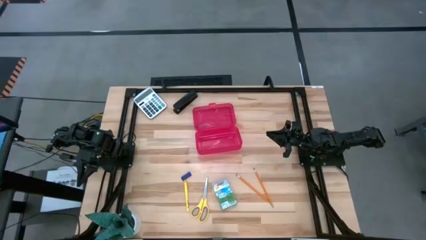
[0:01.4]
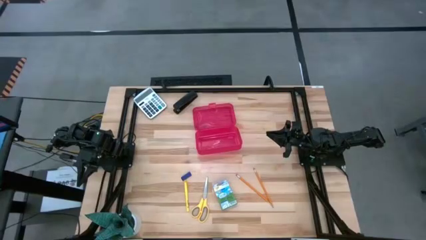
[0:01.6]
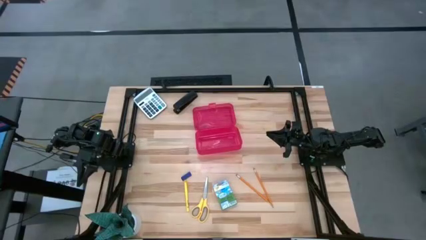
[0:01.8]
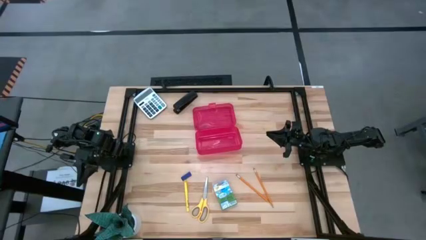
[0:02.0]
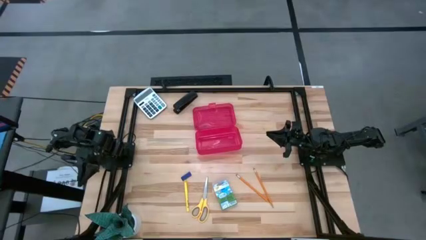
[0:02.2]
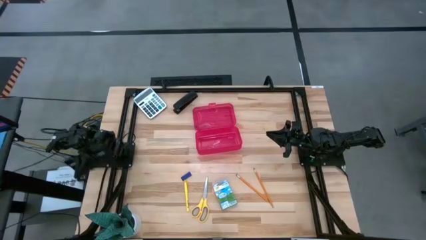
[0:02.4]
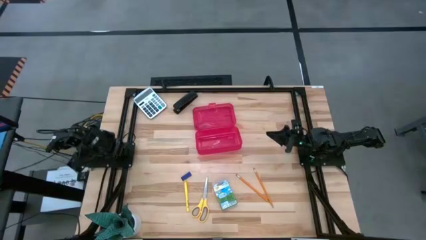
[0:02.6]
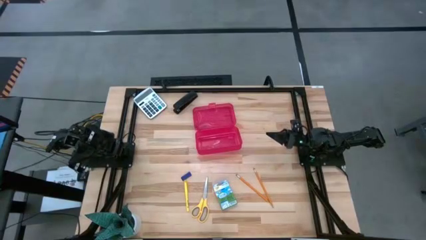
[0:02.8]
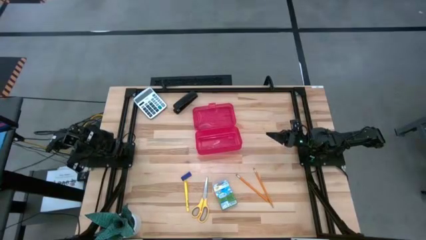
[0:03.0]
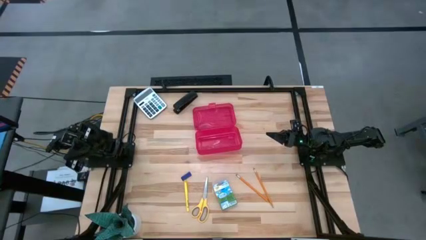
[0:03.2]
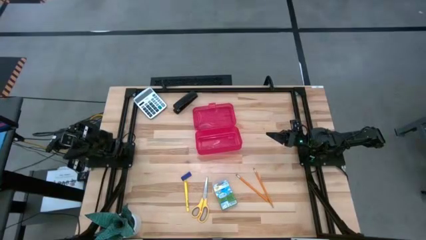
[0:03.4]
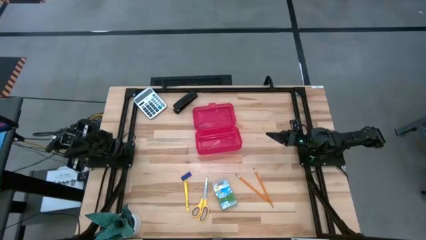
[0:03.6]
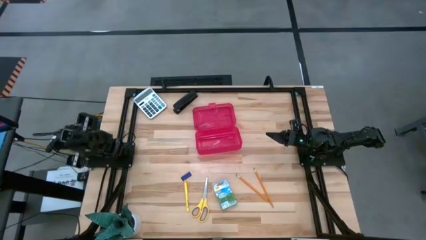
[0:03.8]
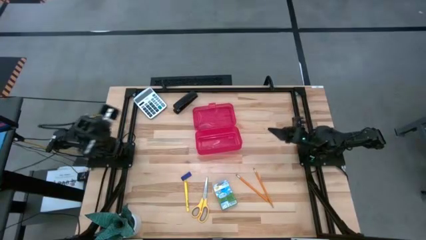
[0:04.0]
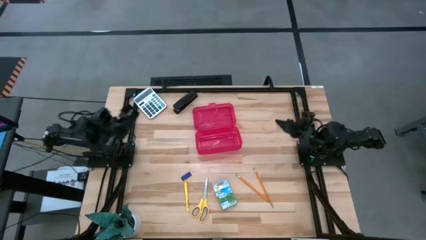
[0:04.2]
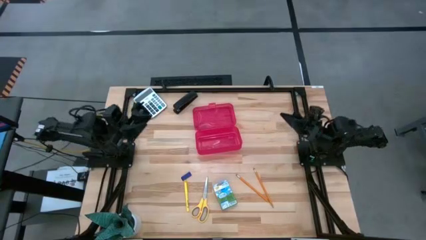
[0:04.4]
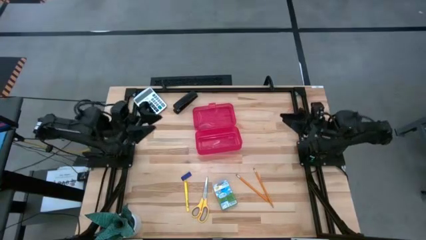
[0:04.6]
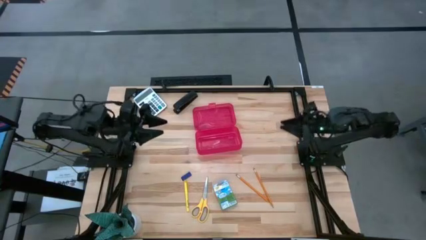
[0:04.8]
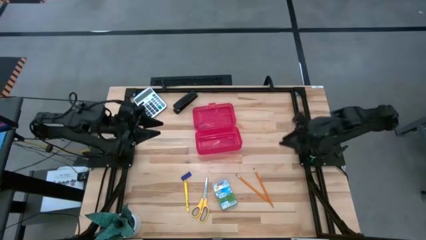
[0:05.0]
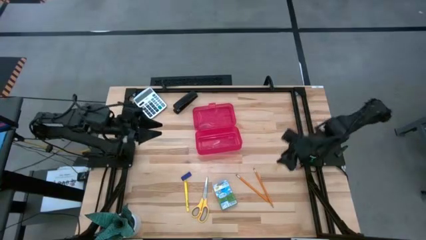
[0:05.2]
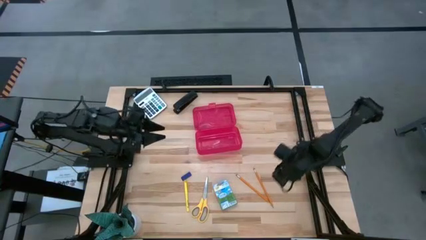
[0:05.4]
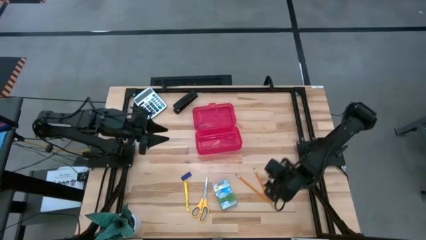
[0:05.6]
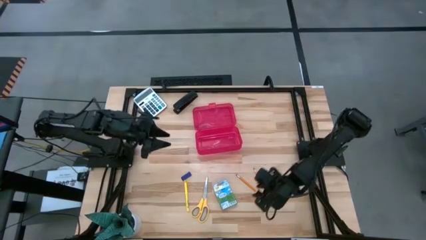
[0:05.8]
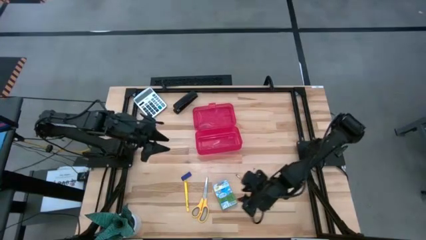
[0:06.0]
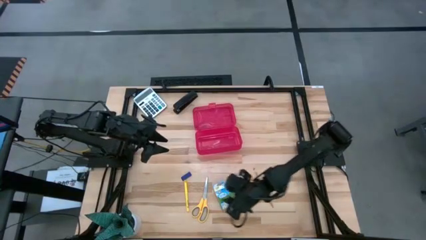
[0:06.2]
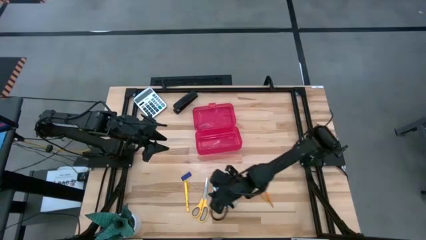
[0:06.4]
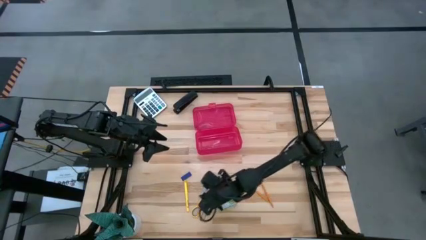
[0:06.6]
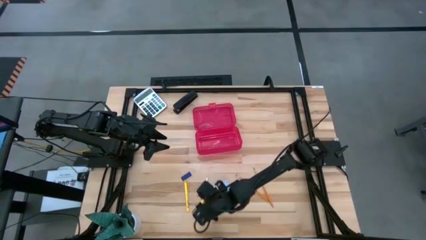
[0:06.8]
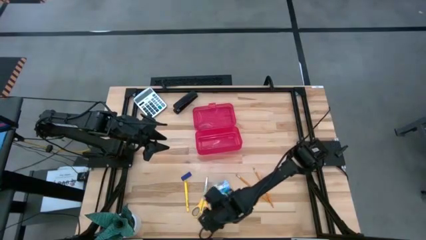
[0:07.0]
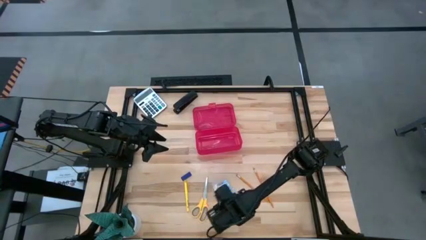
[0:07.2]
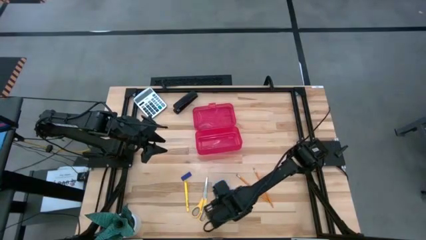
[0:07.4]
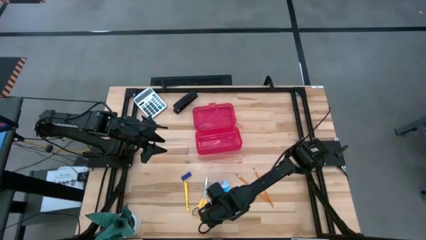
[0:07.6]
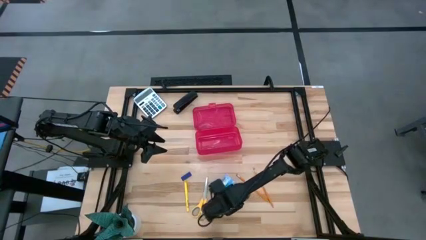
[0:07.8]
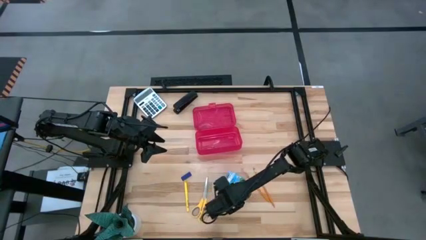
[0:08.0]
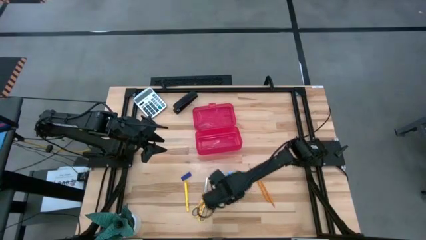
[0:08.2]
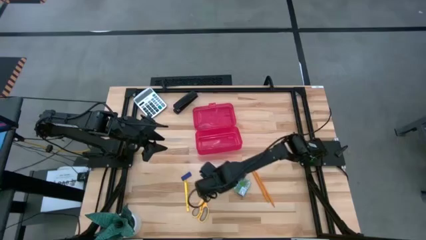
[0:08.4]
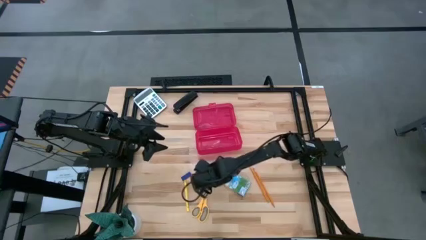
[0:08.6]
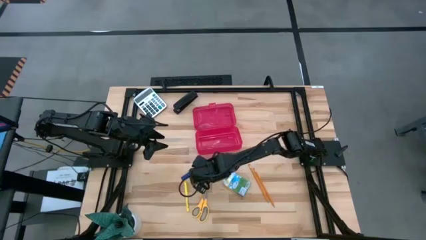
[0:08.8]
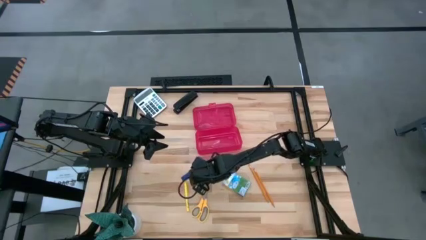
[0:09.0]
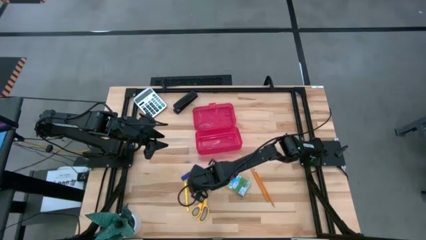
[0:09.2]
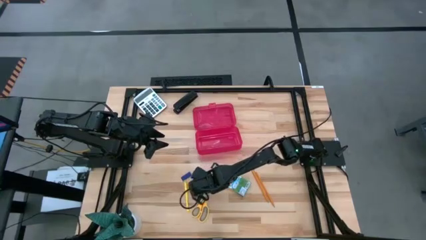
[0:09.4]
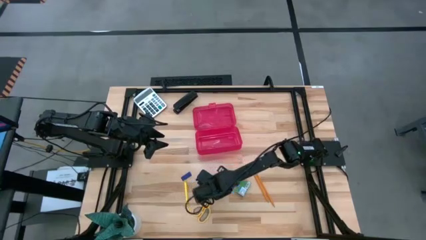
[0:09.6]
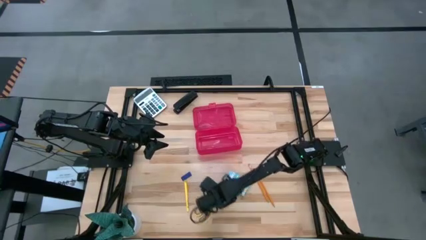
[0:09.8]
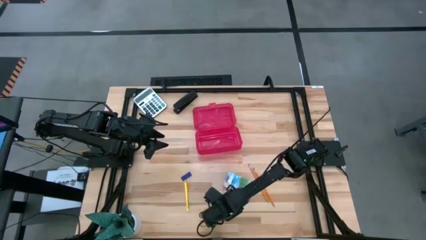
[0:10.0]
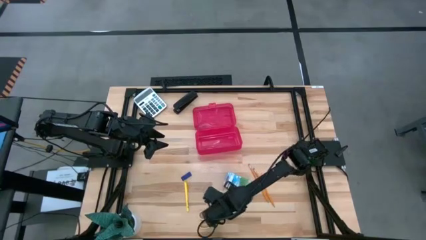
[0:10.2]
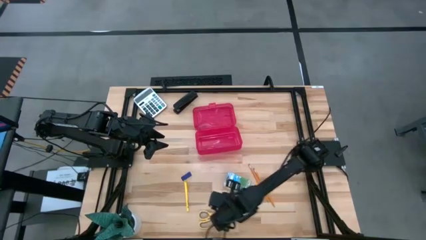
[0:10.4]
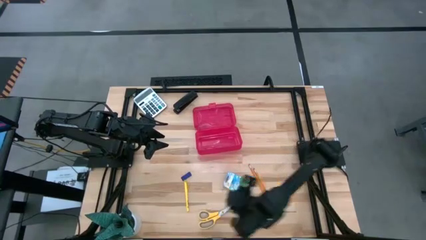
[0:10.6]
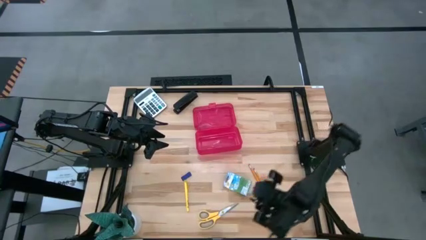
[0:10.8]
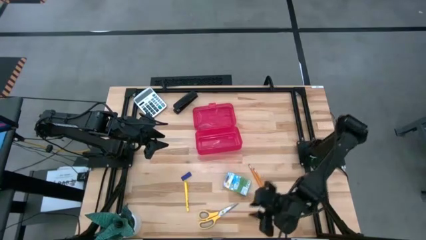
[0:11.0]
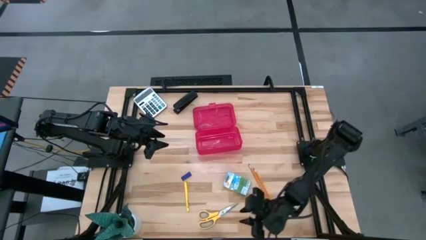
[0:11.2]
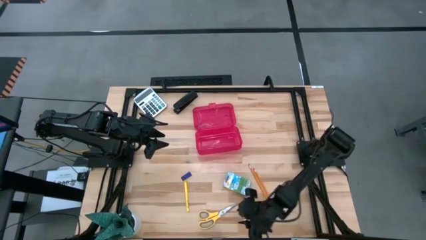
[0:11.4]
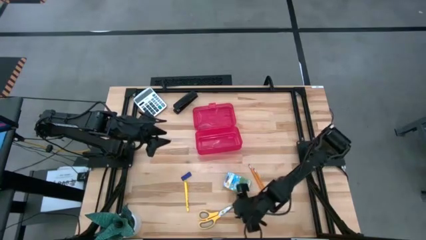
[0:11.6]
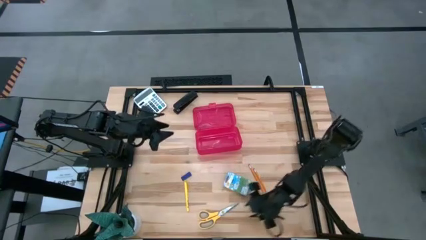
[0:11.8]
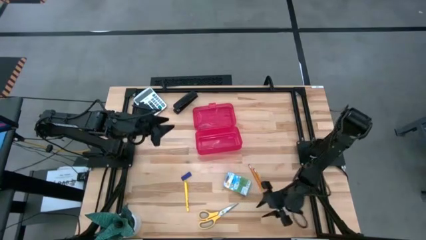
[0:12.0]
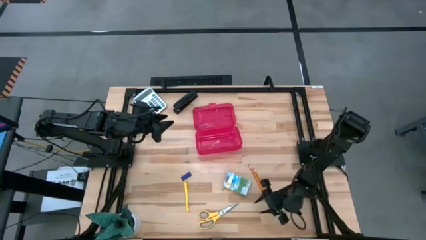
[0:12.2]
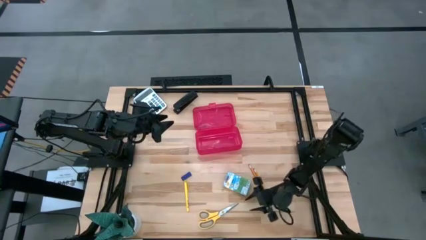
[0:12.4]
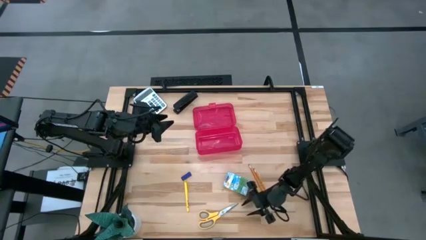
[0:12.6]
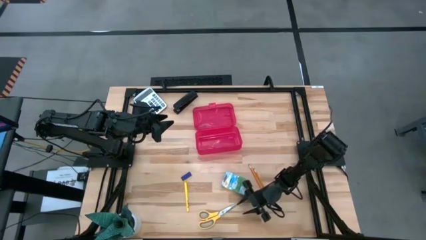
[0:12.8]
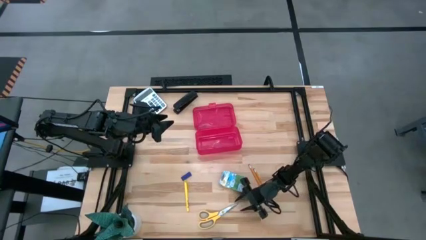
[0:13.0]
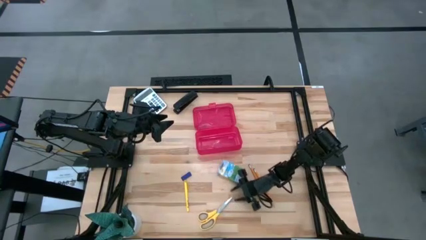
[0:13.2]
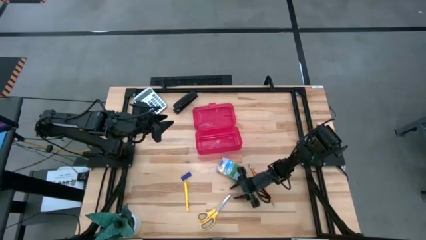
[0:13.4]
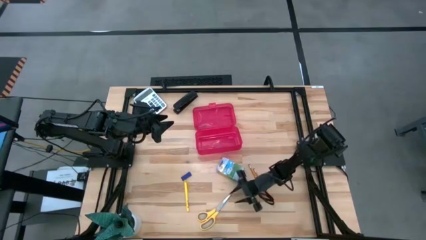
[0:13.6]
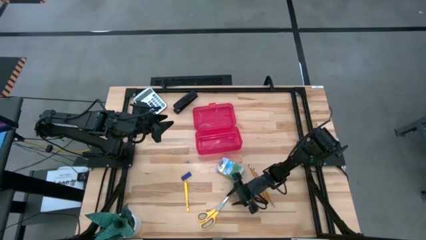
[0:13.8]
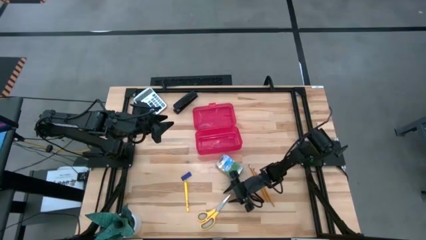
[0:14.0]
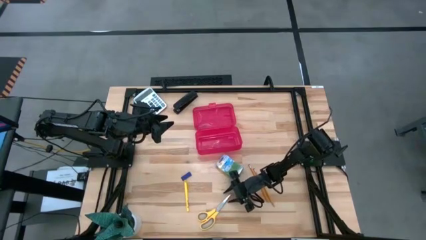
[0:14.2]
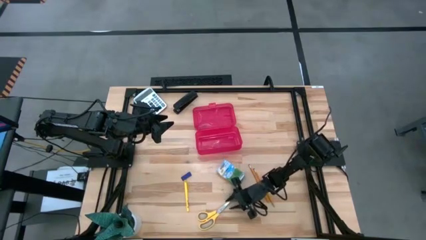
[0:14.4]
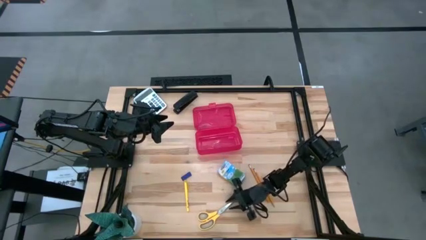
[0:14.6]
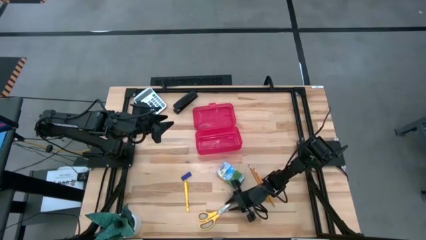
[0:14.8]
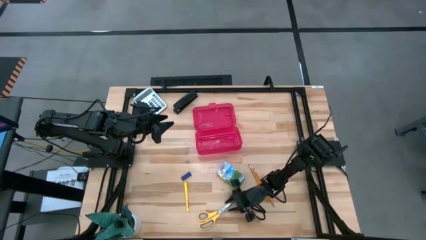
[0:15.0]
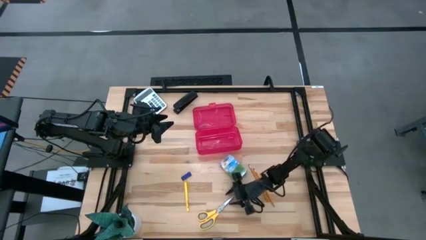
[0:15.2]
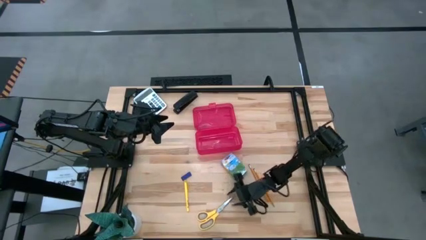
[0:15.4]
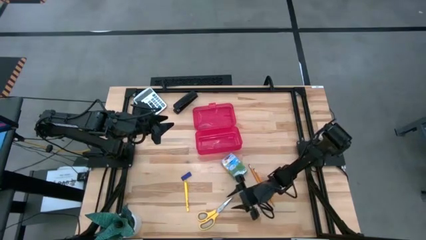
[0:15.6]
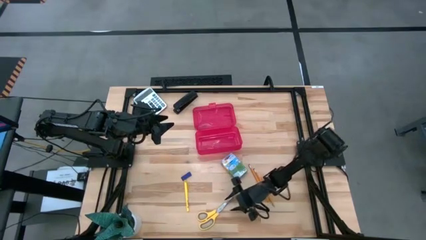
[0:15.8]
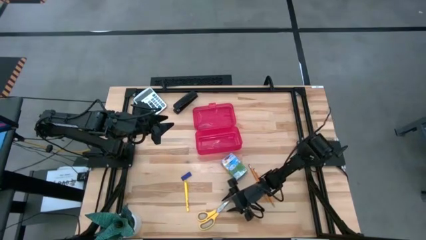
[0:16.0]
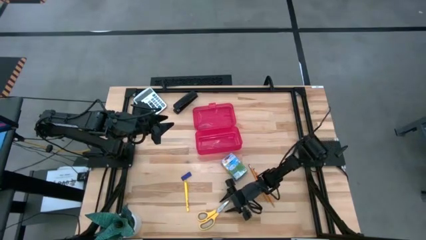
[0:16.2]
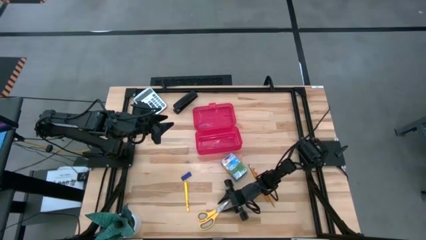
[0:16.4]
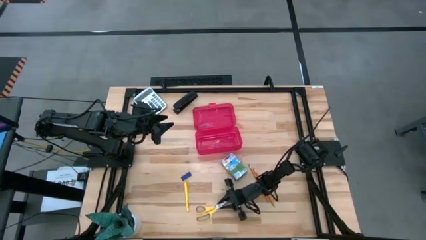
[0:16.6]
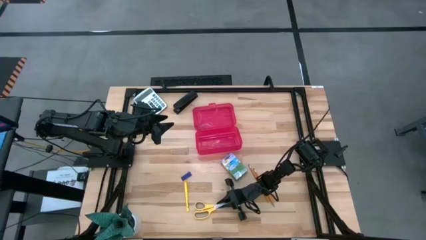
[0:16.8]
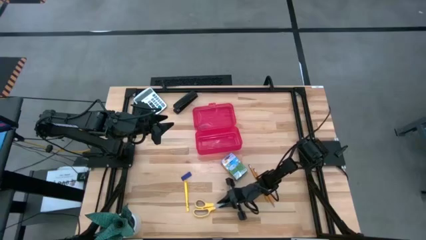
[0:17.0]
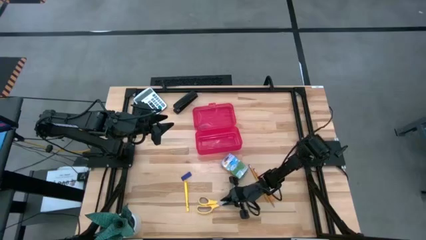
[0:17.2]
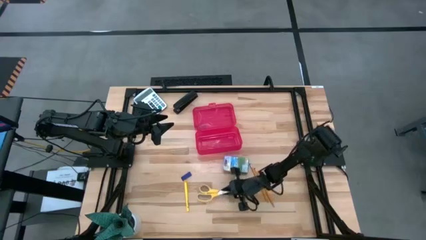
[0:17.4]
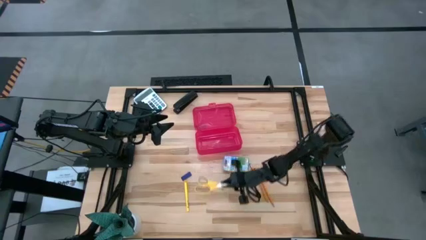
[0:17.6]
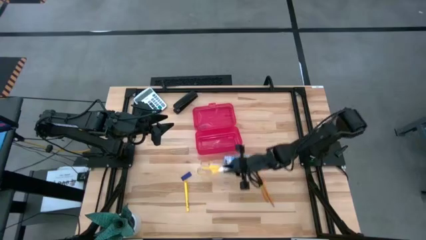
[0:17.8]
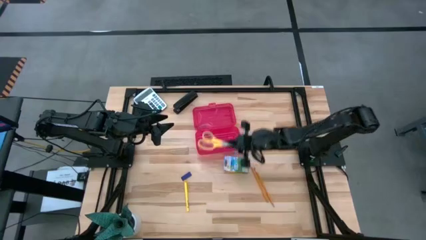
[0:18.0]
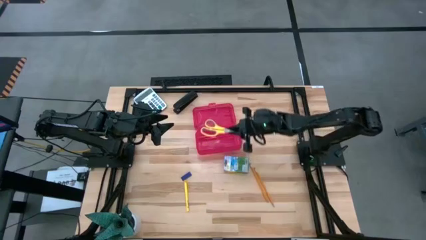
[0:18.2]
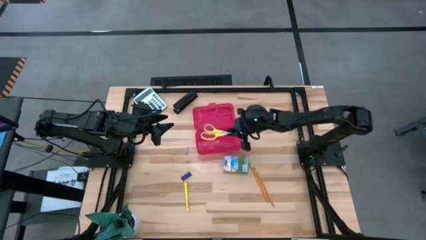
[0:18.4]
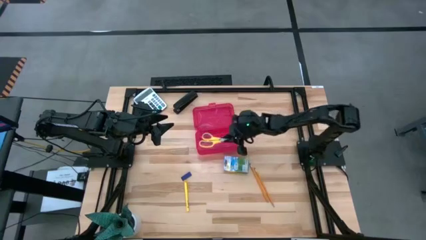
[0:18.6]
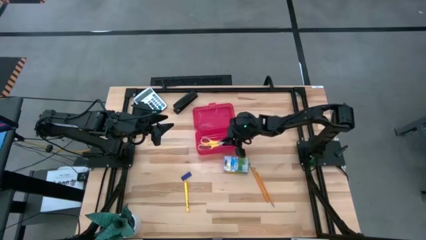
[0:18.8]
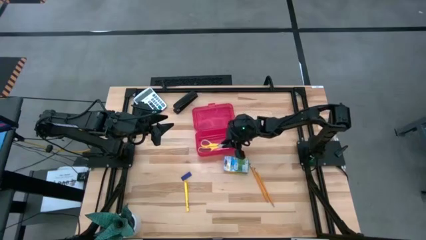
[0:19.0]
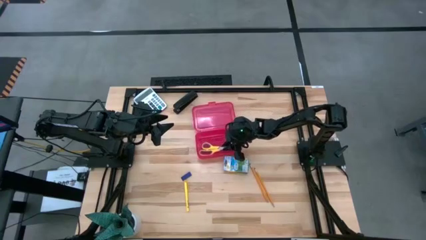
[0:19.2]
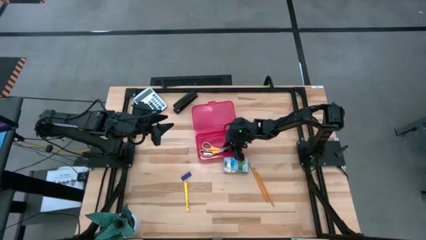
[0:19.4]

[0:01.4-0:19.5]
Task: Pack school essentials
Put the yellow scissors into the red supply box
